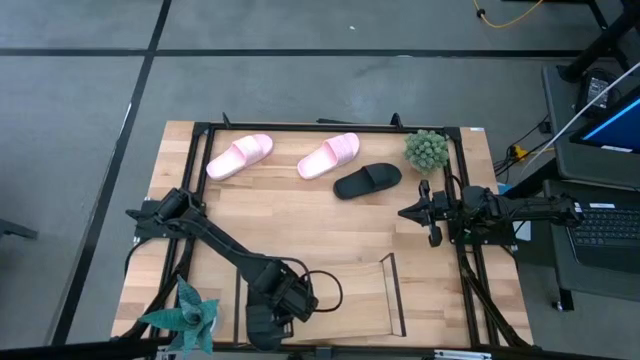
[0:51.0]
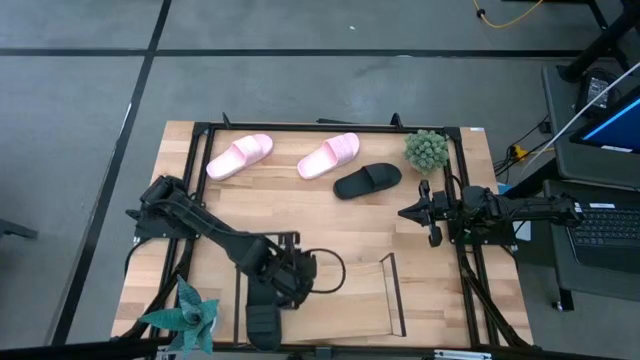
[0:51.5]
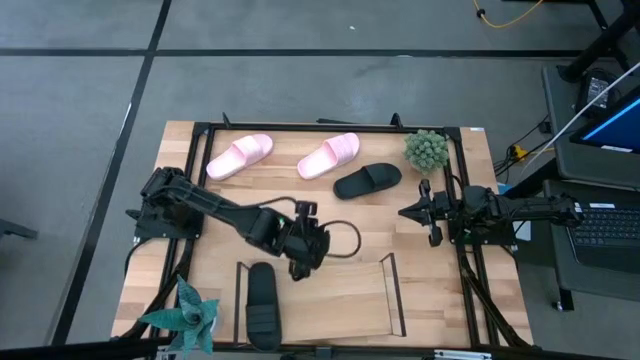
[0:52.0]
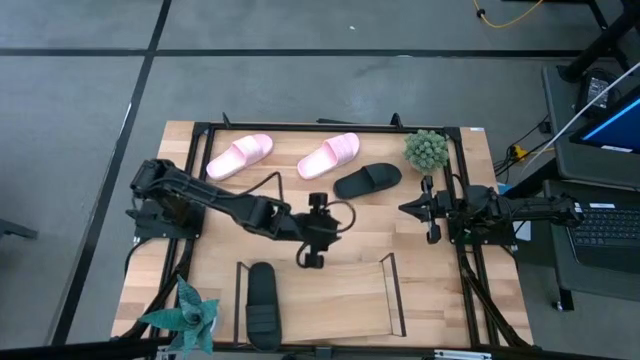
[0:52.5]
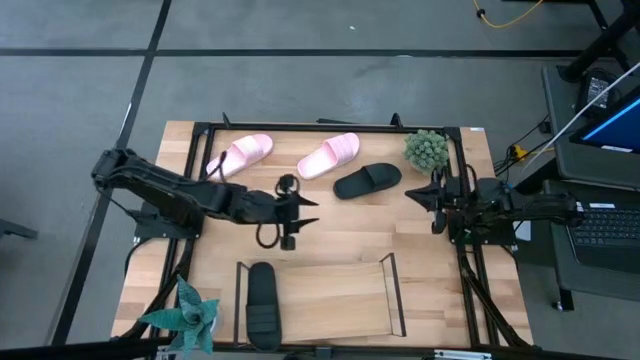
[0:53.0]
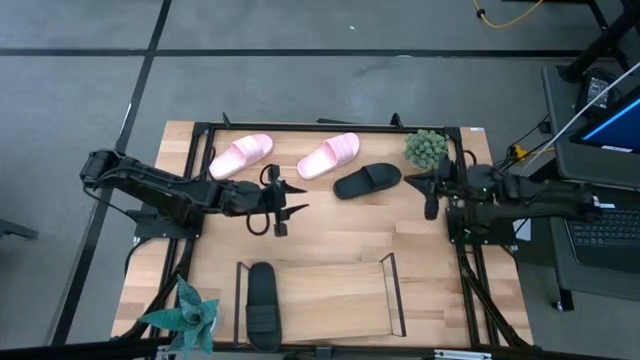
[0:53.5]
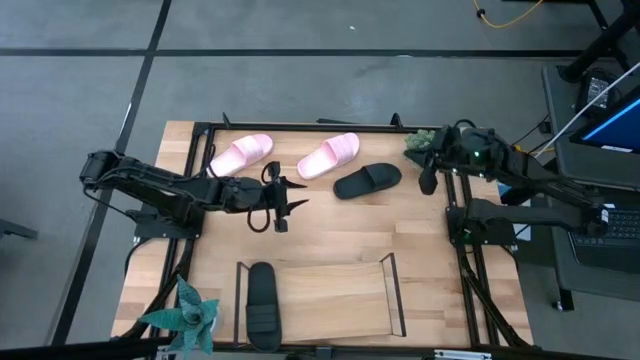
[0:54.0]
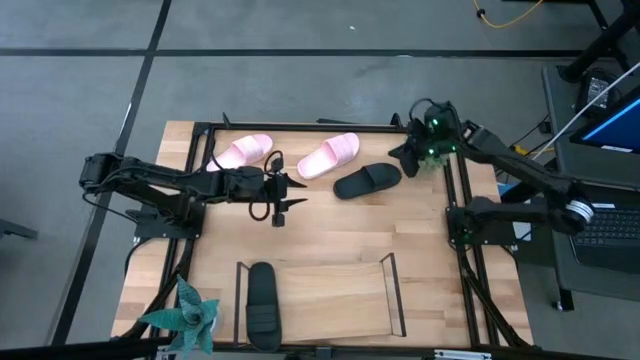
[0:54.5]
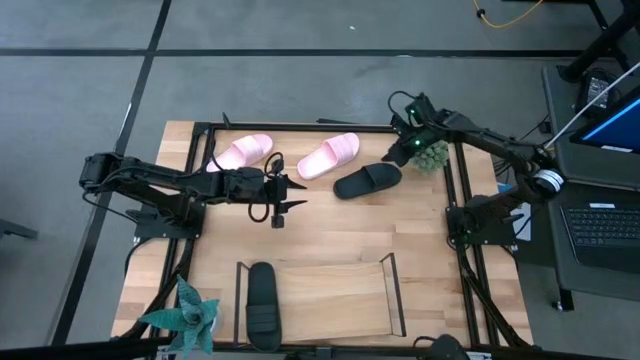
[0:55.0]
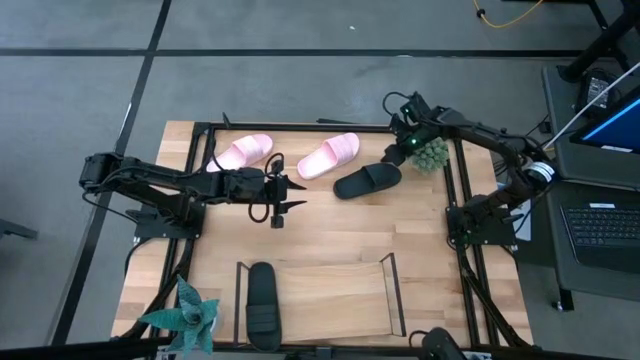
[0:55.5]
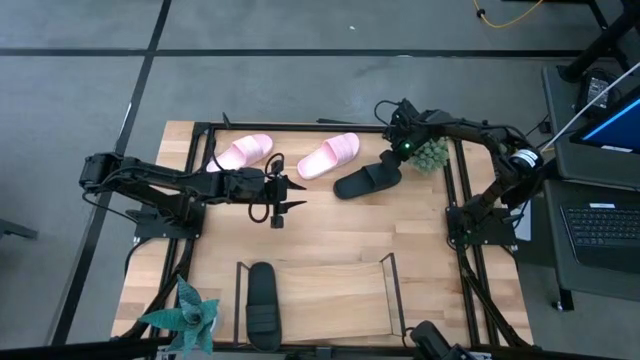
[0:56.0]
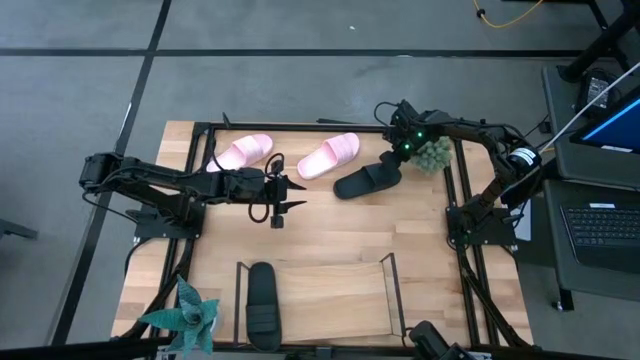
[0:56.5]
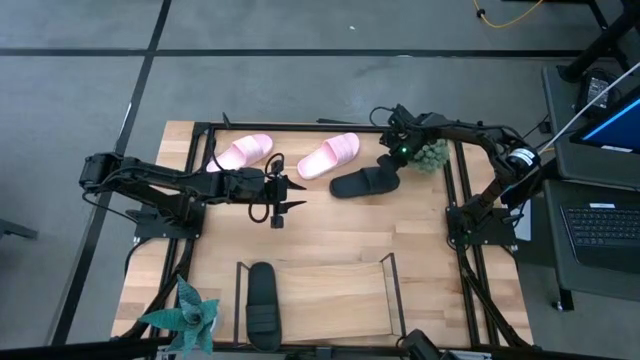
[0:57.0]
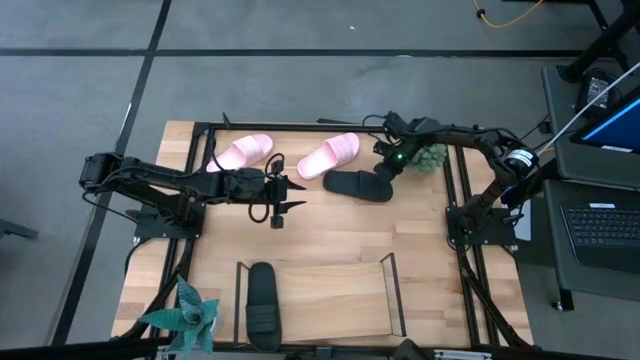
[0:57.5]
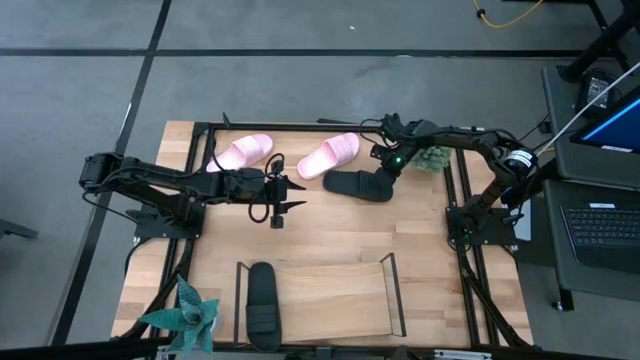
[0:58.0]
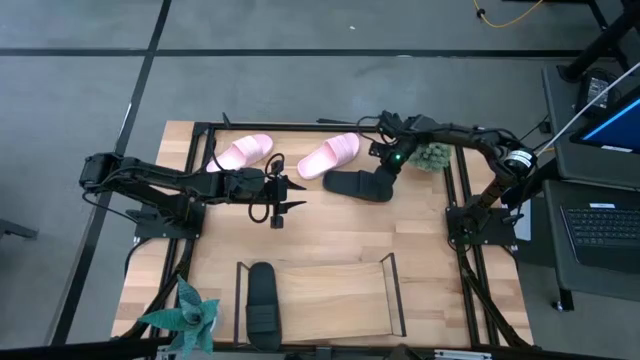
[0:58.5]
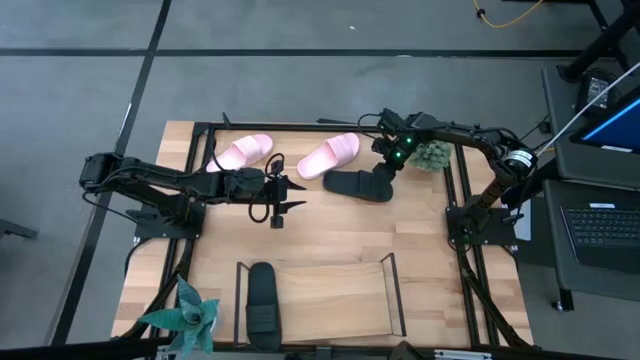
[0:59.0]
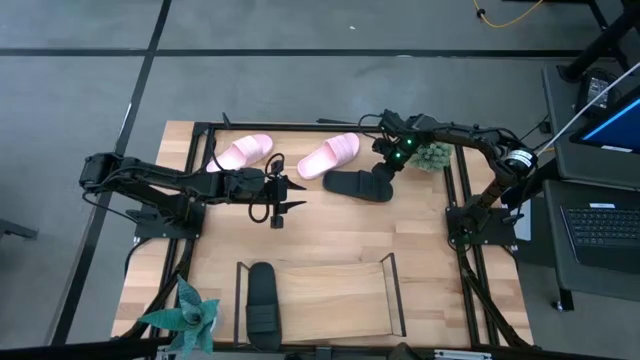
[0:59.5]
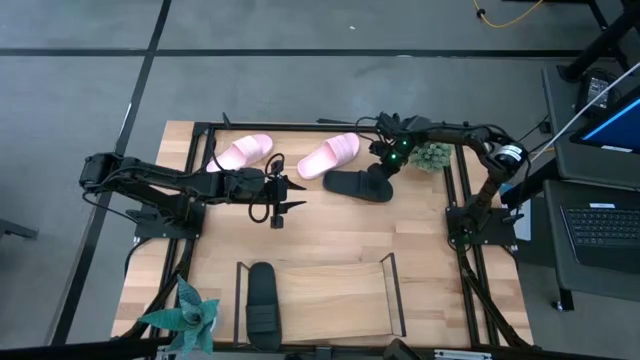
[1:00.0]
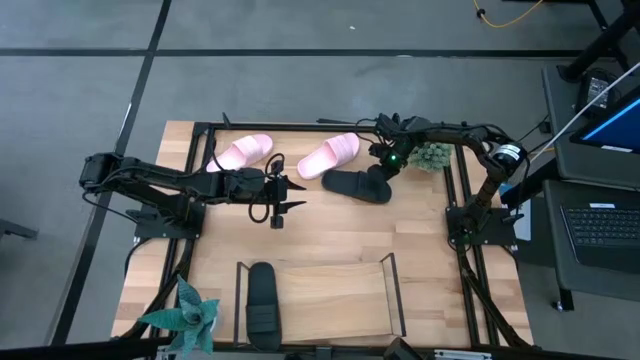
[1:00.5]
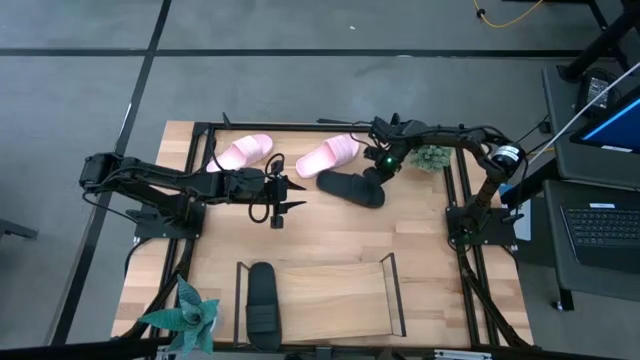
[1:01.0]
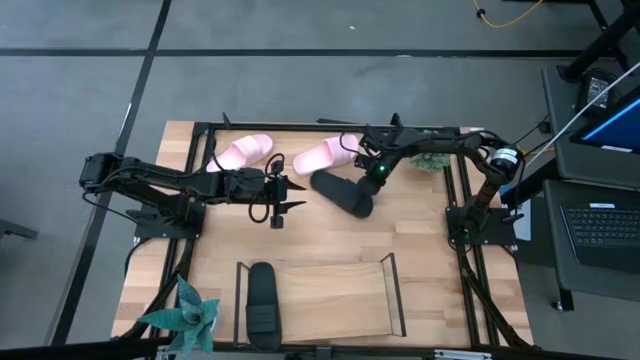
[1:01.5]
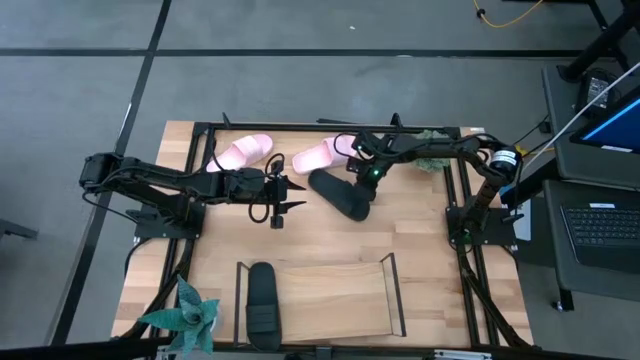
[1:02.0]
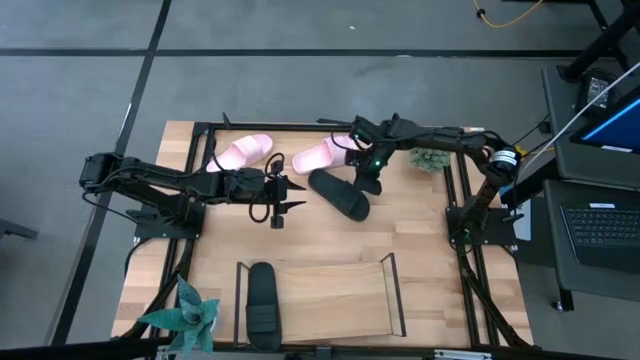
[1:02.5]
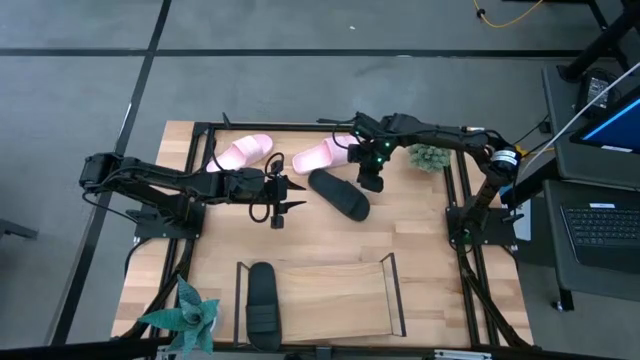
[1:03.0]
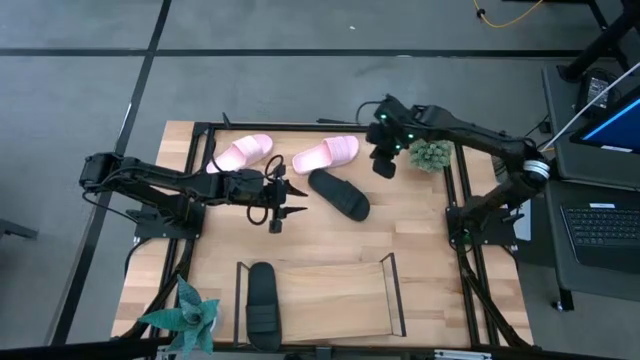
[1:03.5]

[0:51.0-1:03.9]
Task: Pick and place slides into the shelf
Put the black slide on the shelf

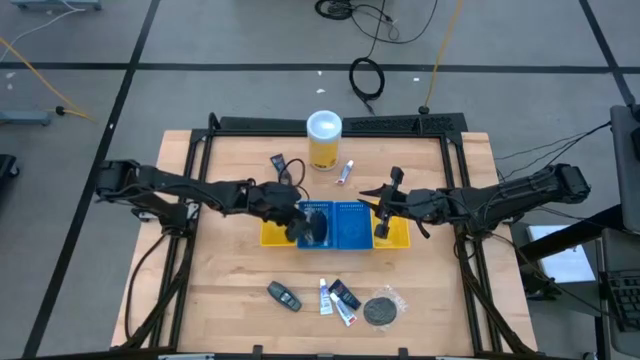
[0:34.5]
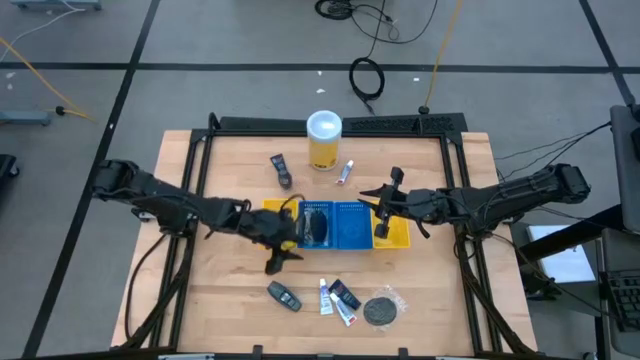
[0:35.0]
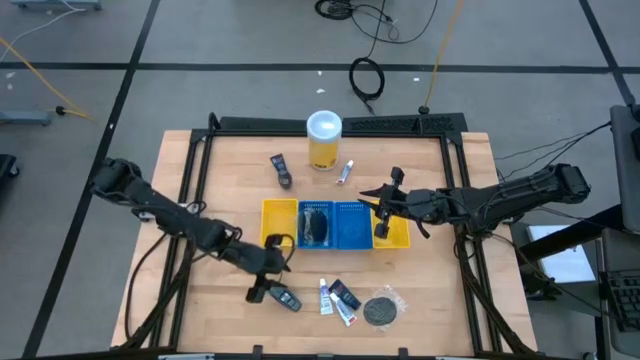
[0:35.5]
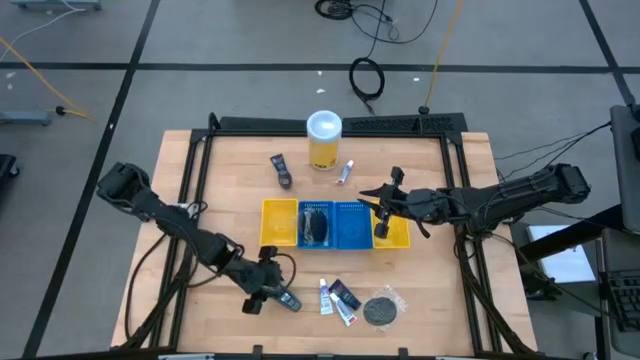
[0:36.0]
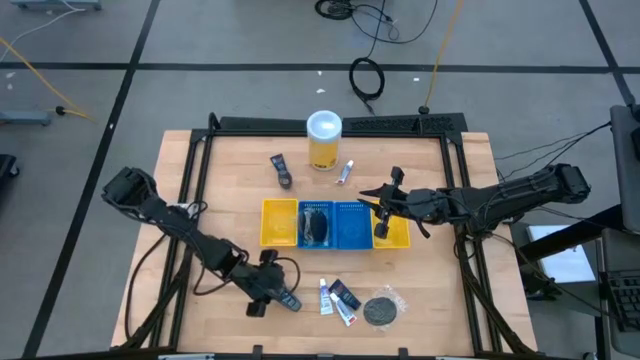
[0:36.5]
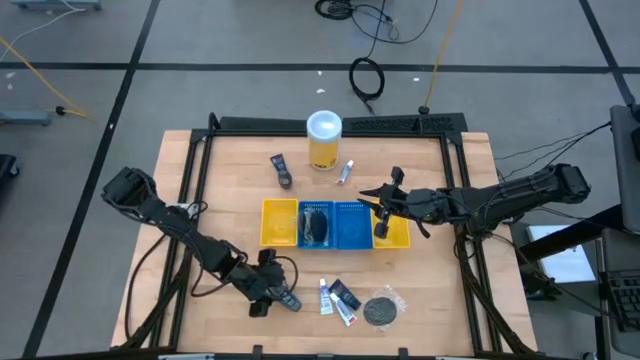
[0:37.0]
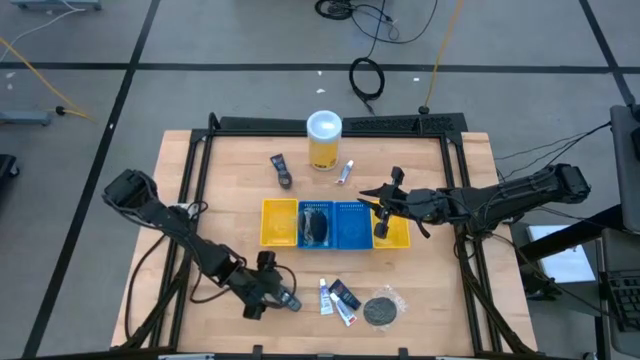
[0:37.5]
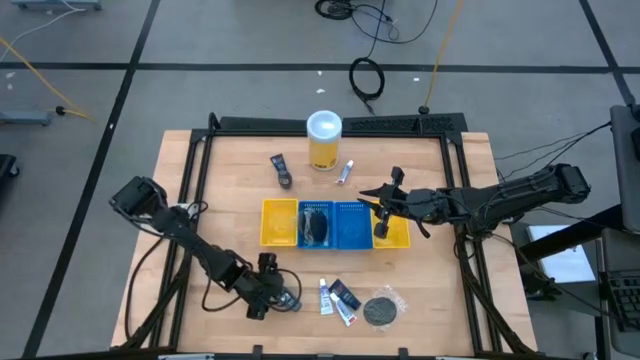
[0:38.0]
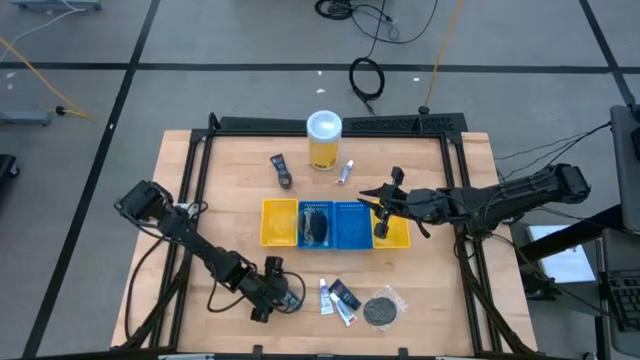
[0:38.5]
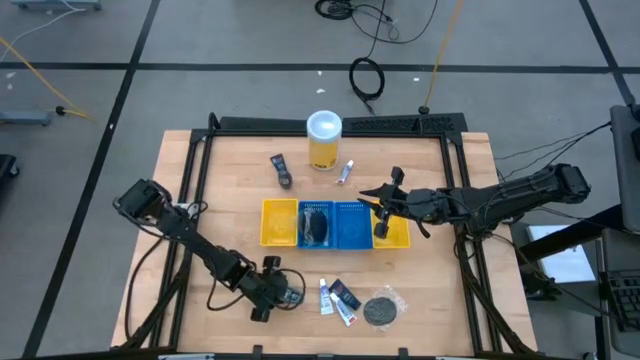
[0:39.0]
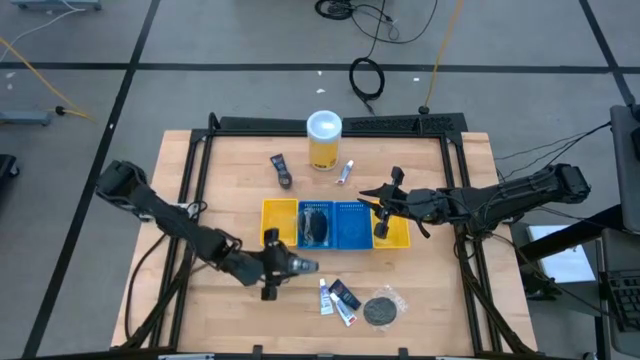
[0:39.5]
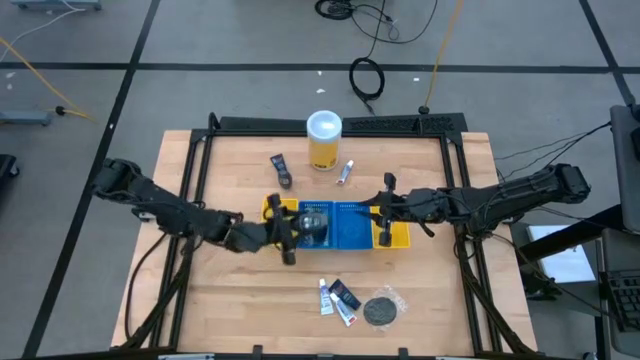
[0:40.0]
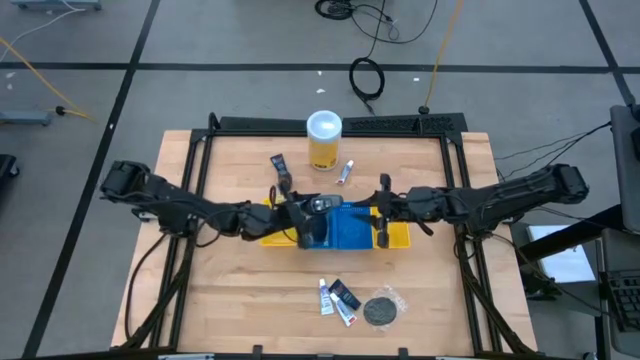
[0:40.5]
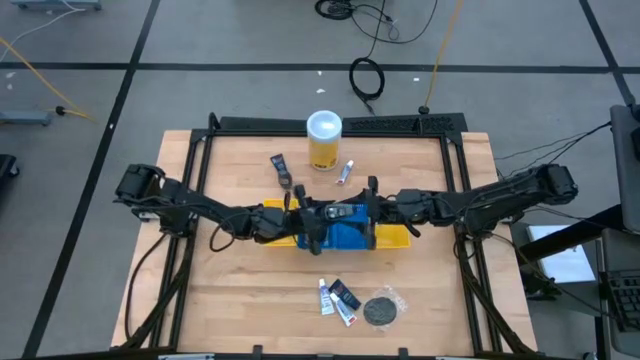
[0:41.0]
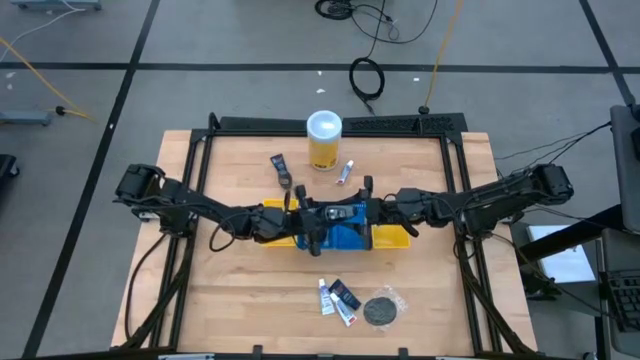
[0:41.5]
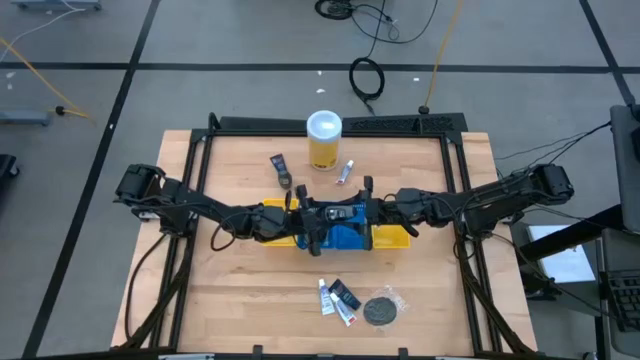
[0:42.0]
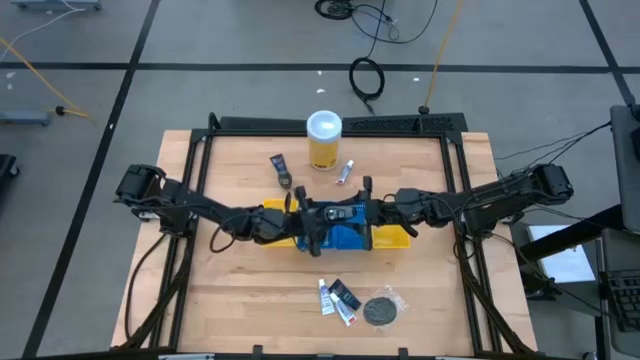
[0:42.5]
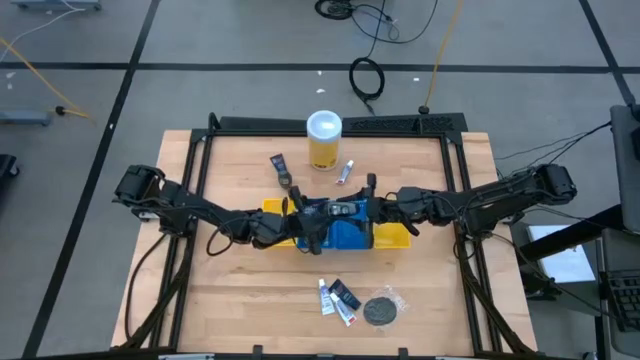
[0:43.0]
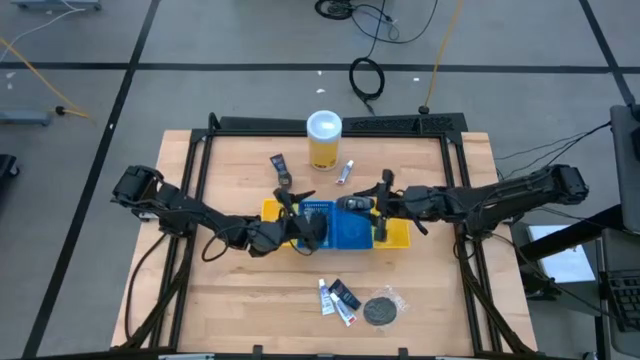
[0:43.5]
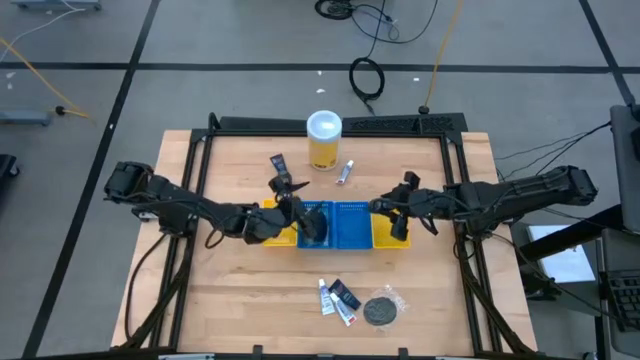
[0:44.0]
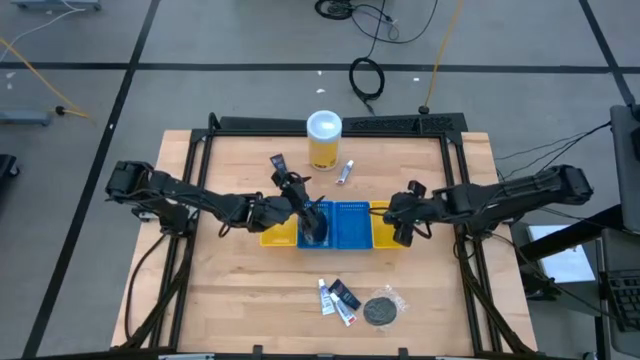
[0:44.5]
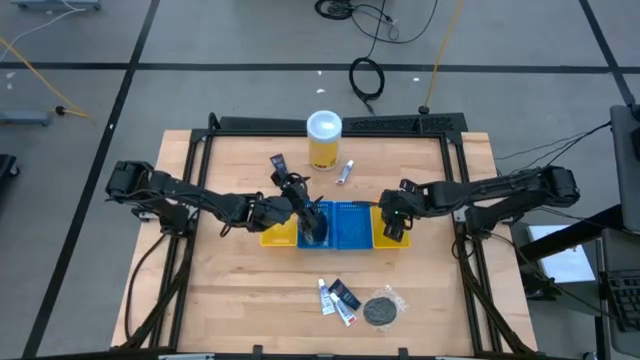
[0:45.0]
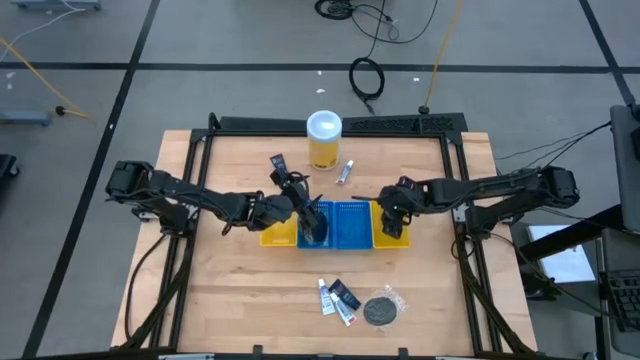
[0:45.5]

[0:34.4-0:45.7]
Task: Pick & Place Travel size toiletries
Put the black deodorant into the right yellow bin
